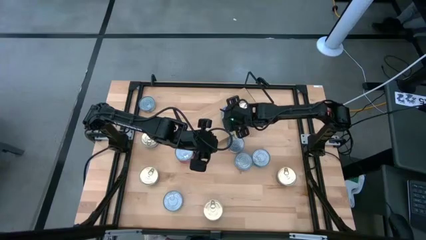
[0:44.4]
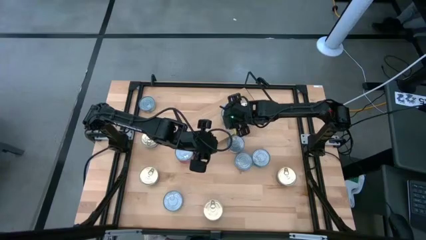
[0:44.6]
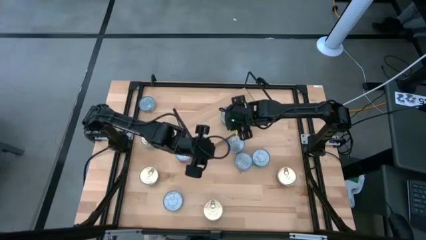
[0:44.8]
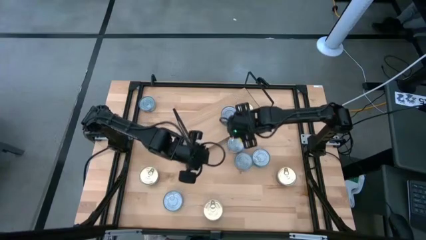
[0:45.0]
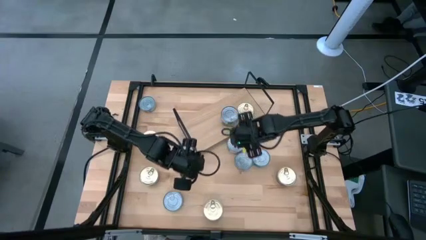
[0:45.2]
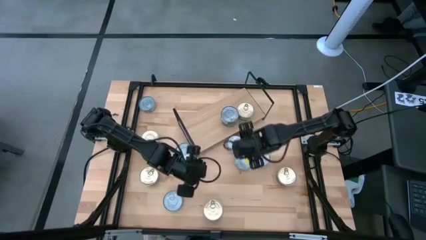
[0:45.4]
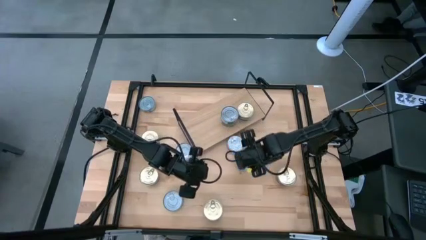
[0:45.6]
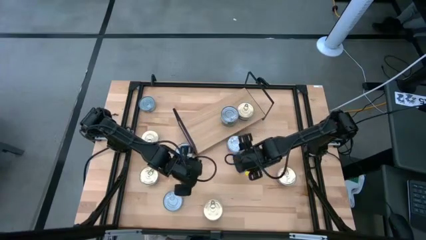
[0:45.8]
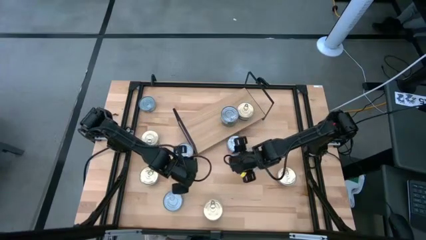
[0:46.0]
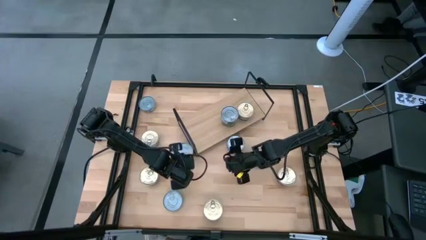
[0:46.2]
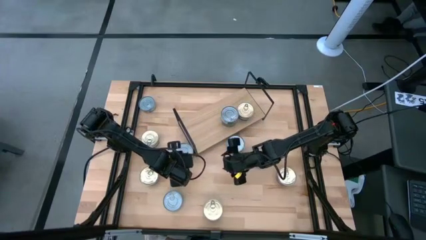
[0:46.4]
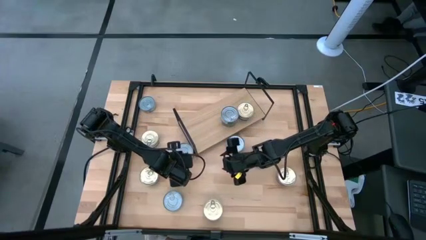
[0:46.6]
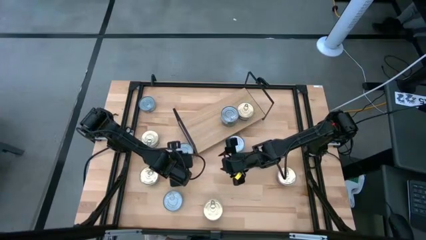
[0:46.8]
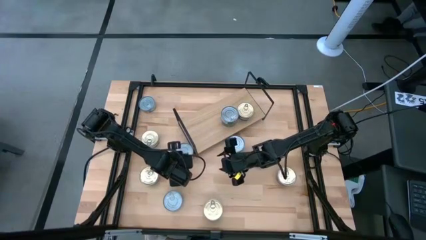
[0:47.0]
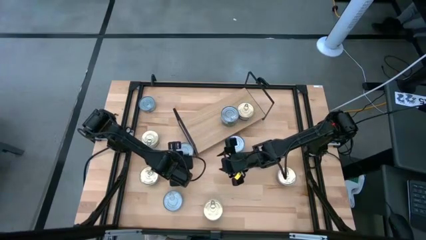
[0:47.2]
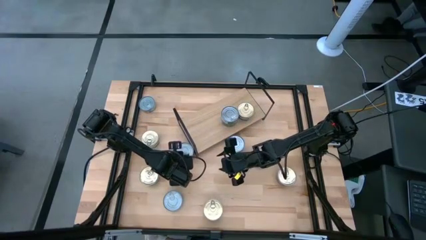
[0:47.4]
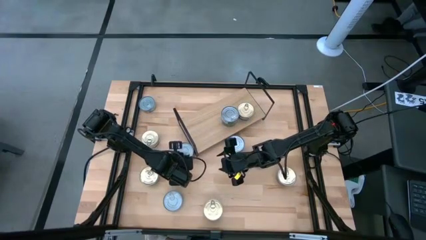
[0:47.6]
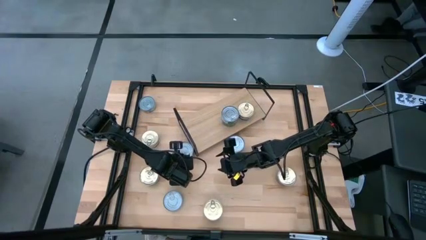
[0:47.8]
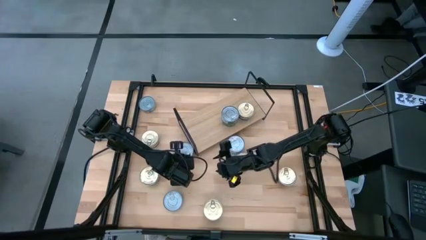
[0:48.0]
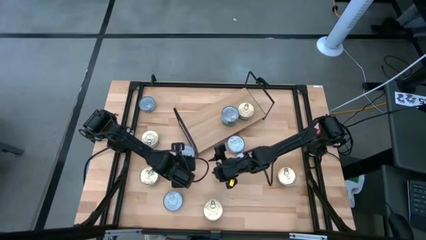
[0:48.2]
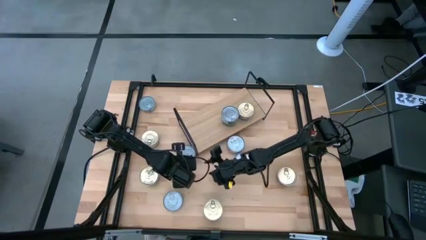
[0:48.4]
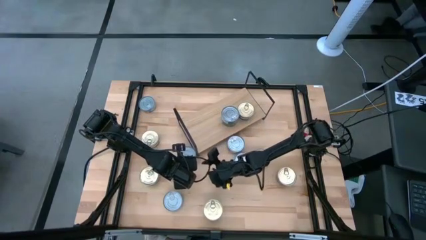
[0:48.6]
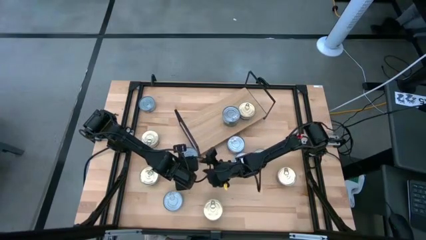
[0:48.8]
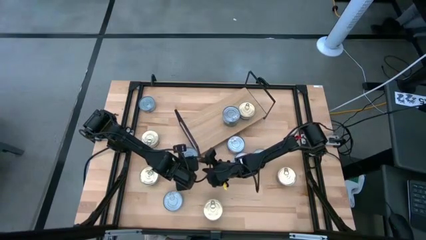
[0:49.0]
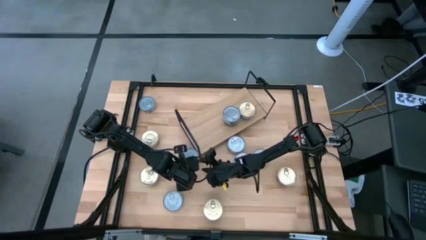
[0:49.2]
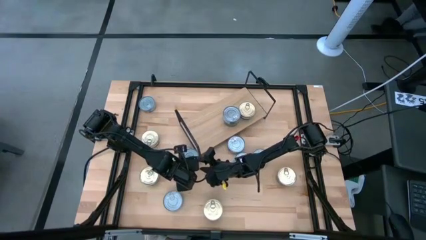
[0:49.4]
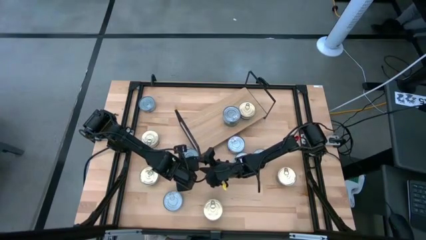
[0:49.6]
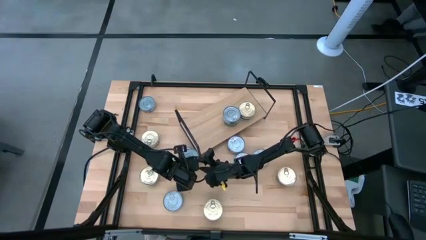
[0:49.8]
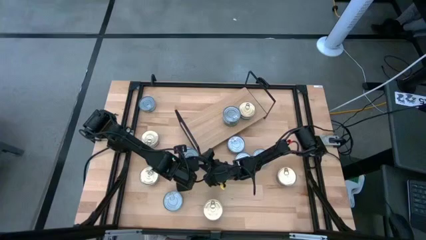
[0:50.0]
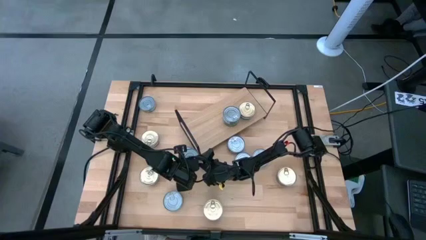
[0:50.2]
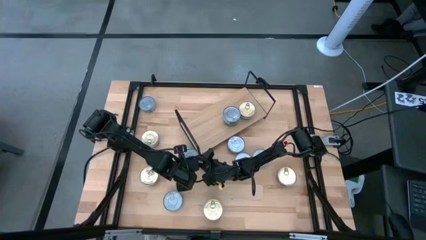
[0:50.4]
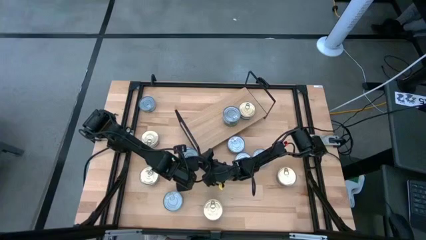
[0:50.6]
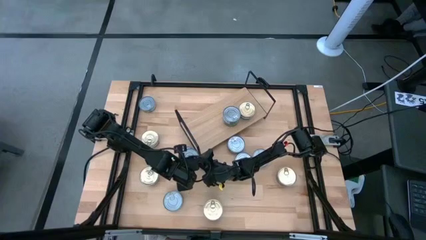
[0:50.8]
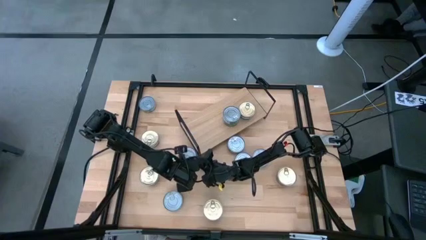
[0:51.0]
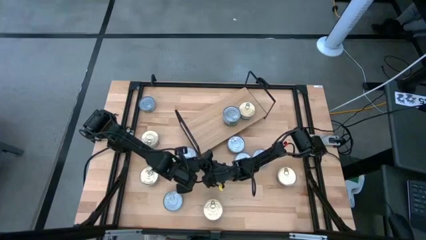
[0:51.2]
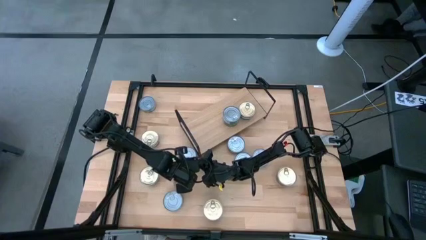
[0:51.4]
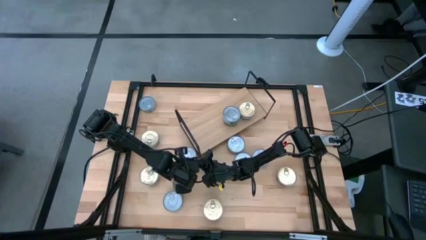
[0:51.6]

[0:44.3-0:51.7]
Task: Stack canned seafood by type on shelf
Put the red tuna can on the shelf

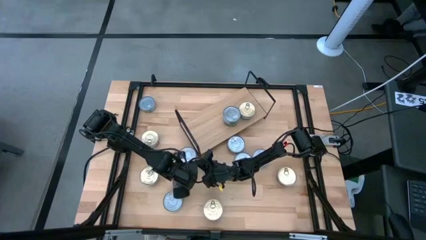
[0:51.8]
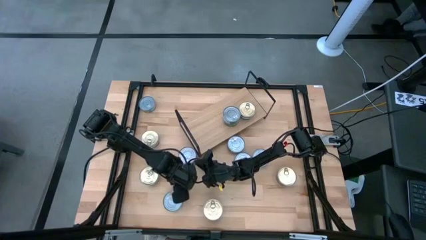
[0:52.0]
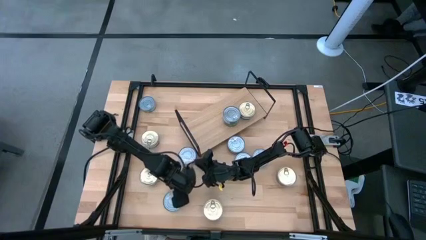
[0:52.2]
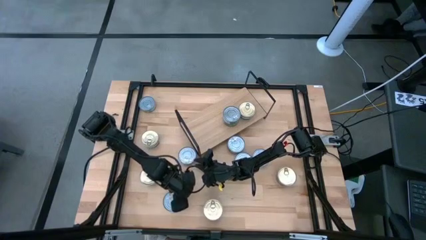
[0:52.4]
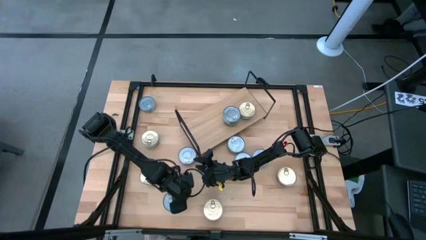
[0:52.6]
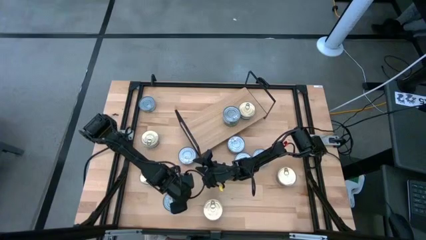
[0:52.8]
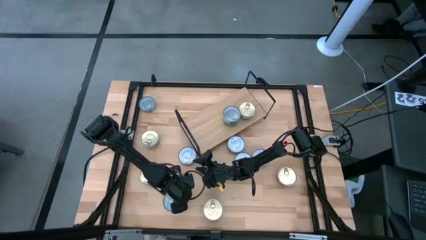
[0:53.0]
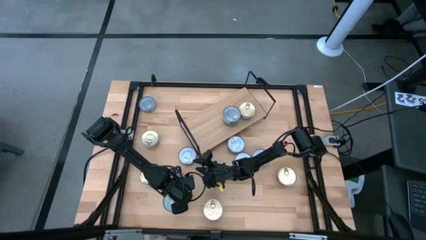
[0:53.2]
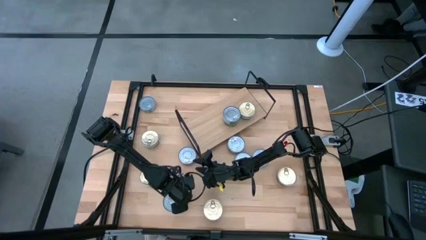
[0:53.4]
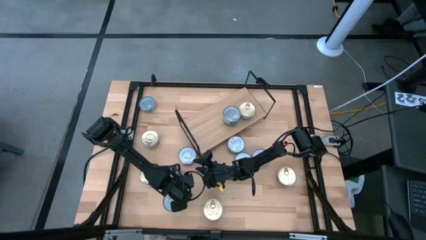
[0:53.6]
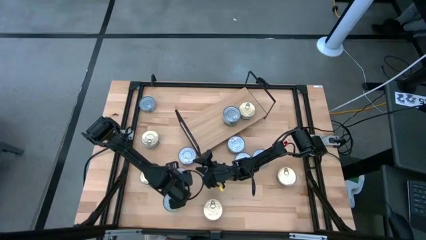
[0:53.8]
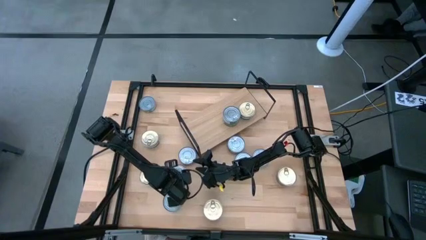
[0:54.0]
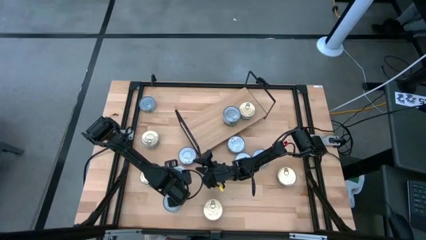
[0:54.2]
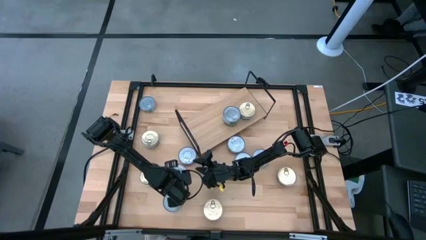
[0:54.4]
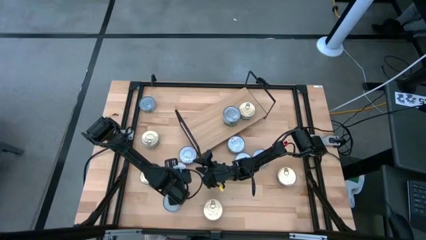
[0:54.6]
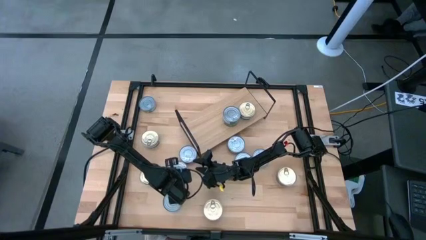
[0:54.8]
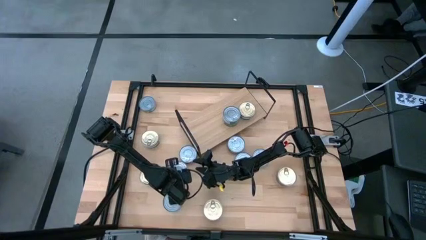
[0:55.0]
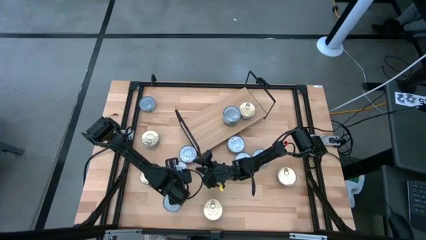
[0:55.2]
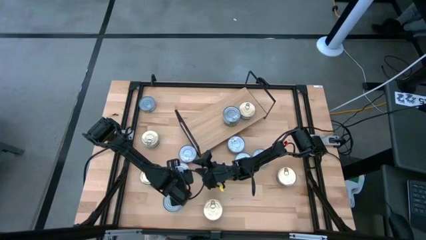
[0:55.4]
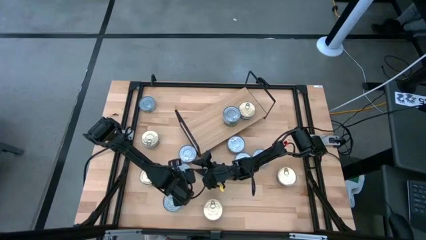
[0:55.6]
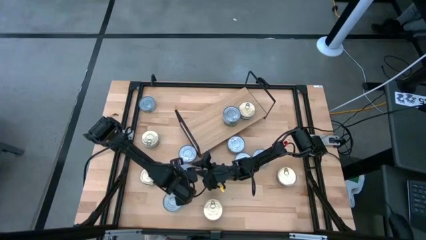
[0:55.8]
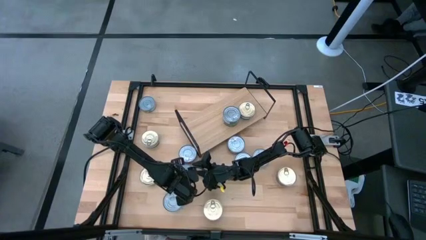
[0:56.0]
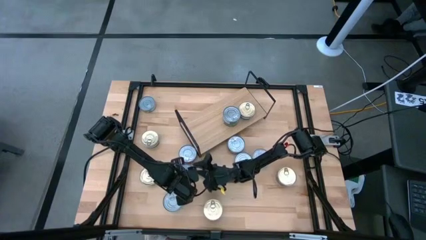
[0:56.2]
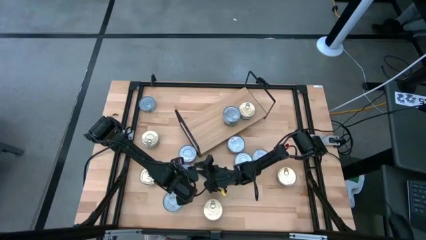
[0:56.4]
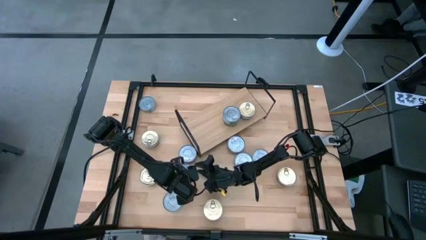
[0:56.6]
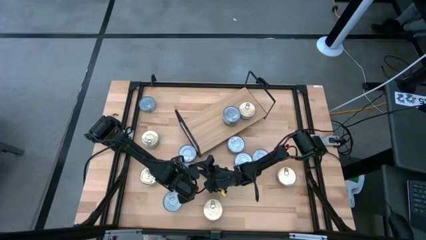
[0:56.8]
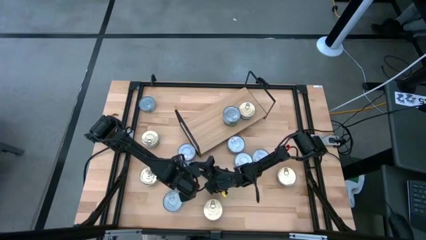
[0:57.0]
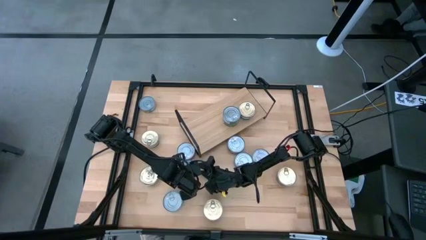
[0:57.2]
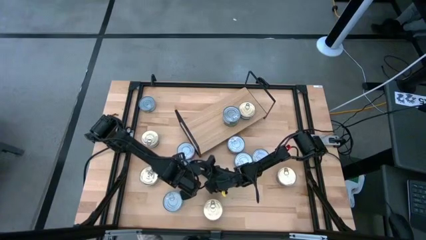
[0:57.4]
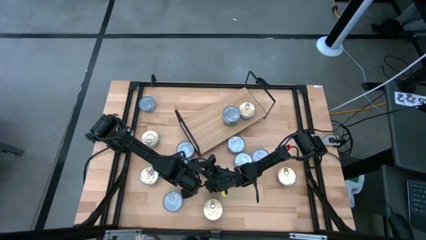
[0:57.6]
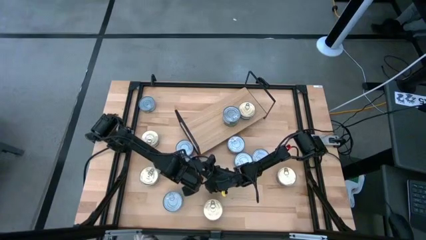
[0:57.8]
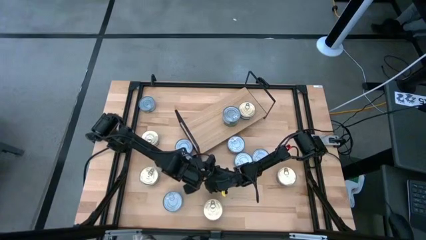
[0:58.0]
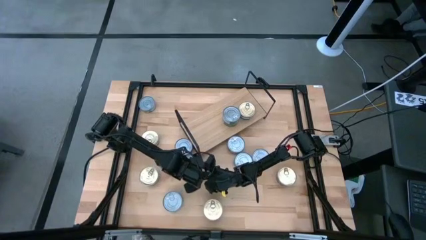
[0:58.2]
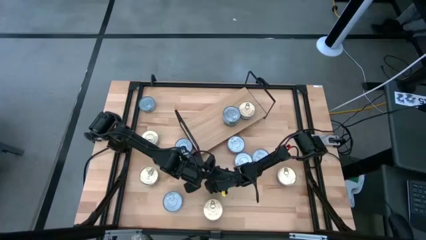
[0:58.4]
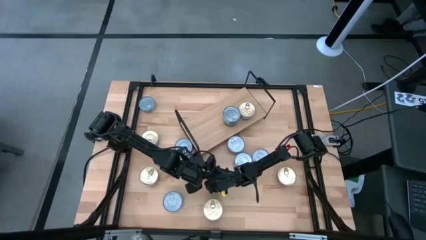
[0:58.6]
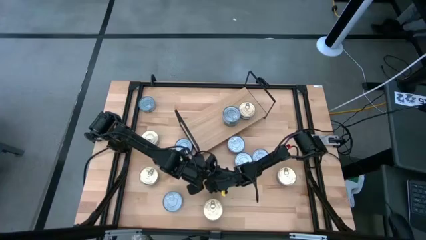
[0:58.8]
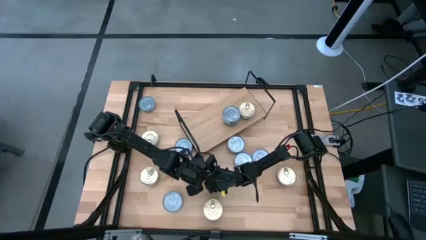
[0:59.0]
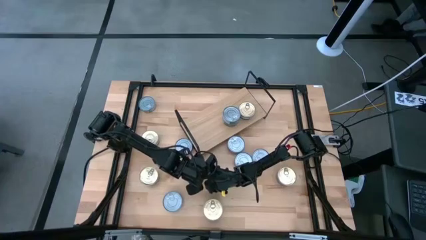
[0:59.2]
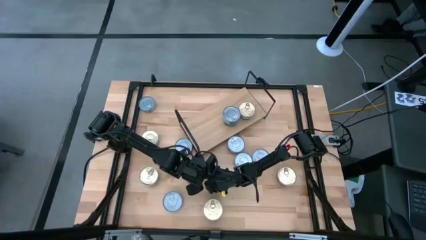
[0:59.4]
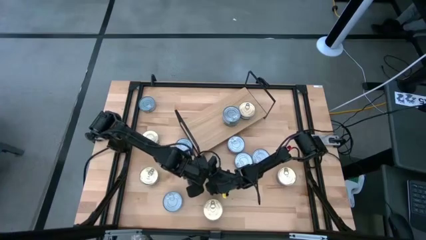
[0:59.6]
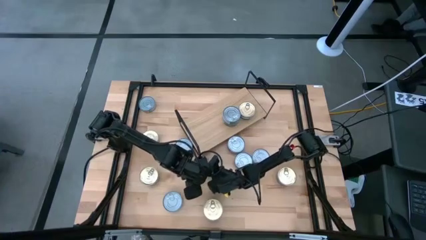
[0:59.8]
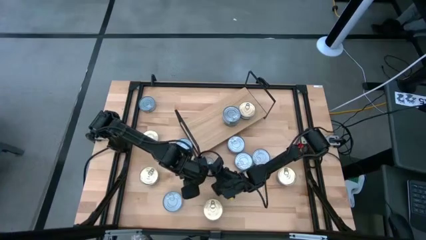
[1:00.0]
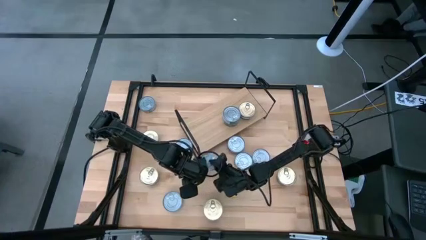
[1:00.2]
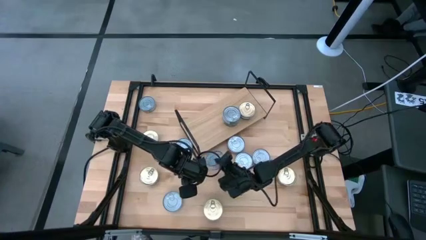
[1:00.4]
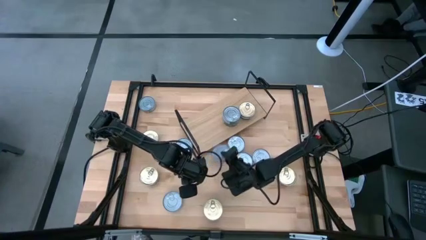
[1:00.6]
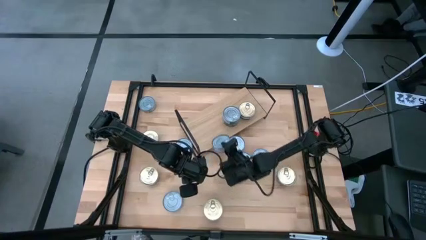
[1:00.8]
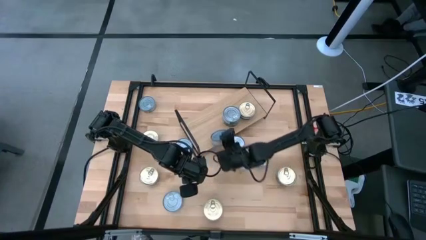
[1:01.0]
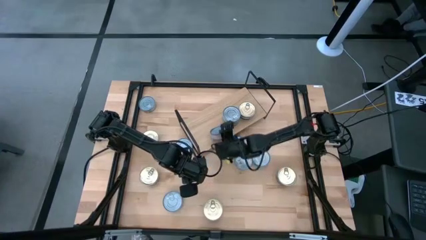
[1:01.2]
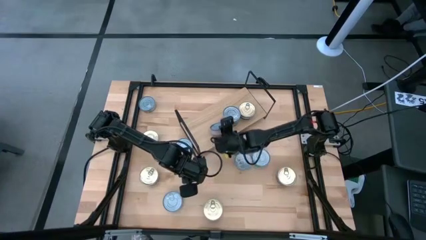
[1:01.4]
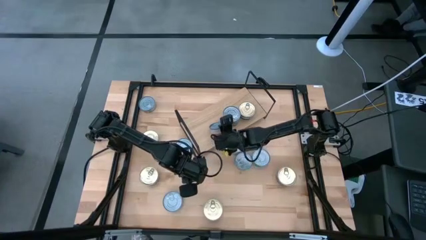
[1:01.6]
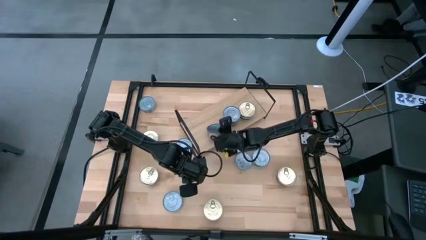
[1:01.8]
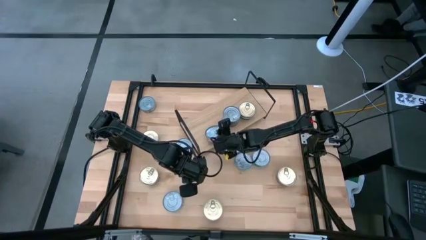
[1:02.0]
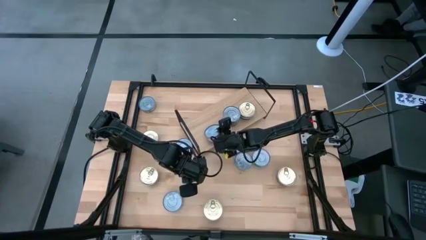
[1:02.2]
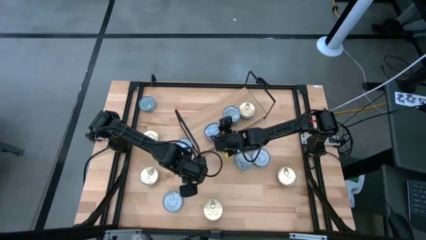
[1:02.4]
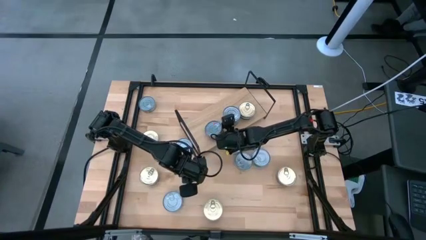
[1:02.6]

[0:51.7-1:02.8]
Put the red tuna can on the shelf
